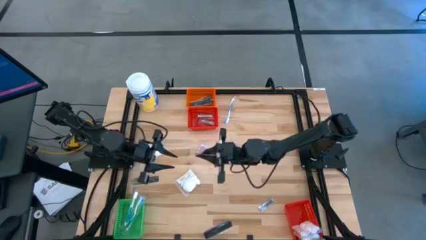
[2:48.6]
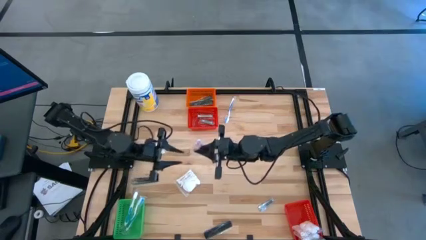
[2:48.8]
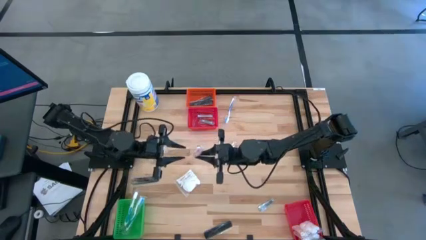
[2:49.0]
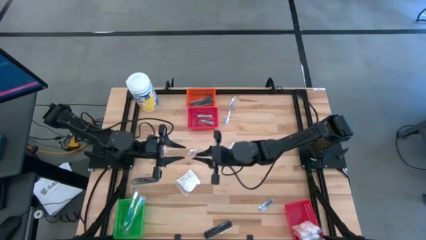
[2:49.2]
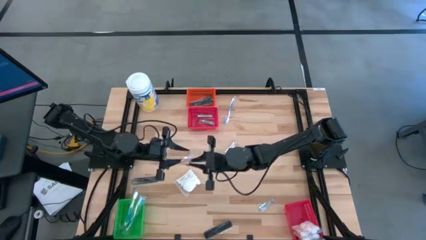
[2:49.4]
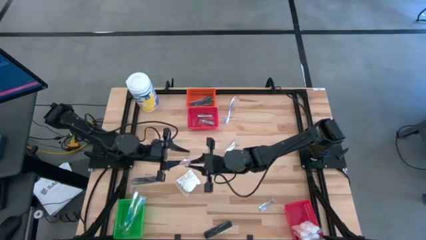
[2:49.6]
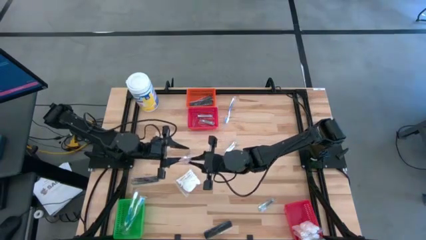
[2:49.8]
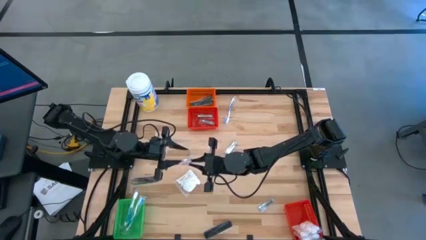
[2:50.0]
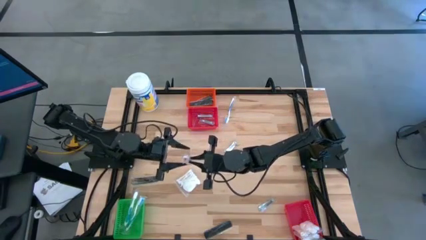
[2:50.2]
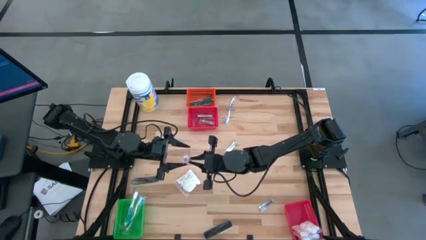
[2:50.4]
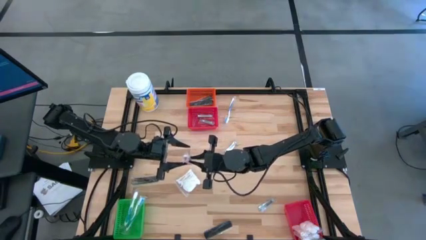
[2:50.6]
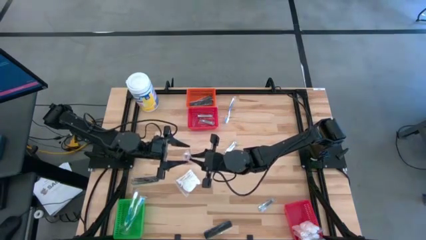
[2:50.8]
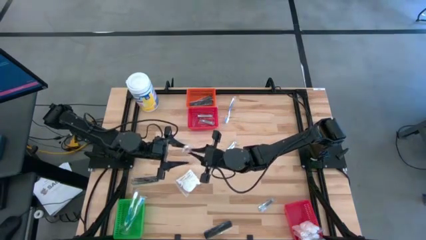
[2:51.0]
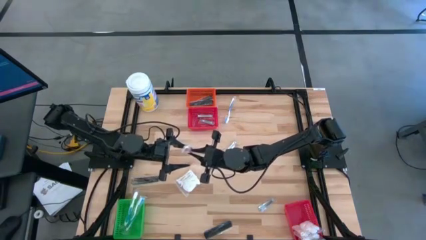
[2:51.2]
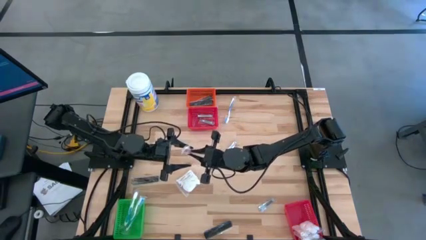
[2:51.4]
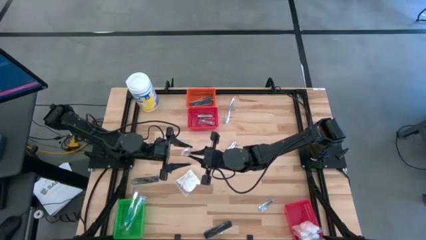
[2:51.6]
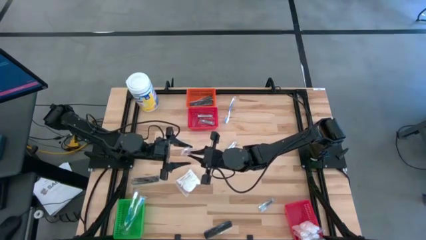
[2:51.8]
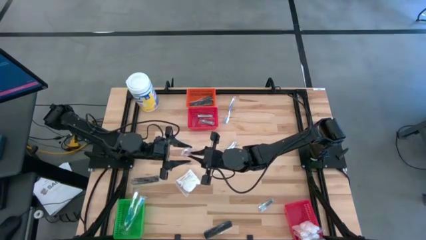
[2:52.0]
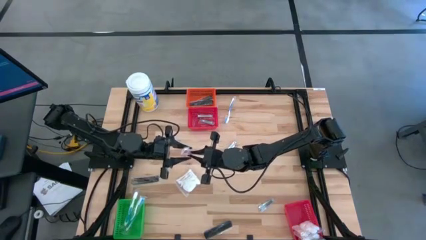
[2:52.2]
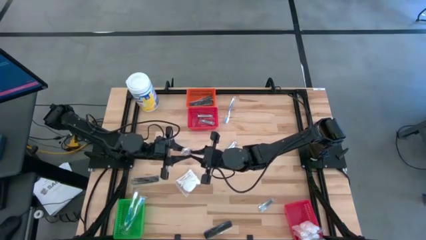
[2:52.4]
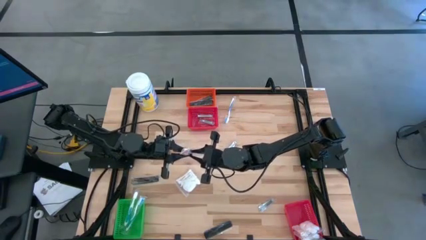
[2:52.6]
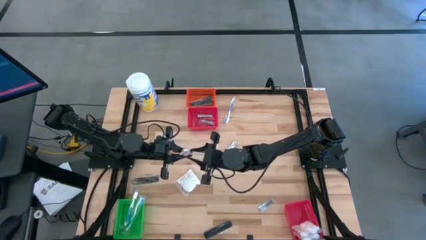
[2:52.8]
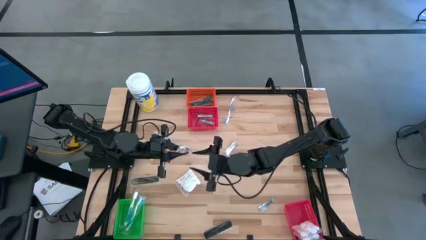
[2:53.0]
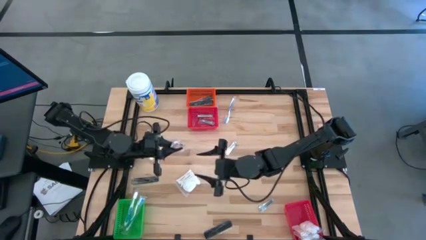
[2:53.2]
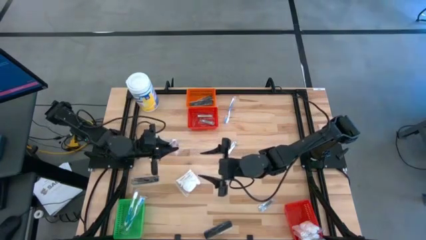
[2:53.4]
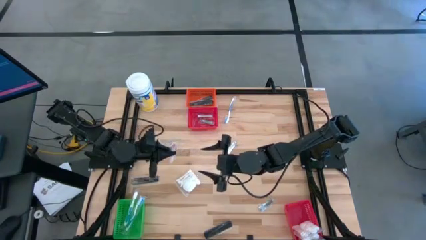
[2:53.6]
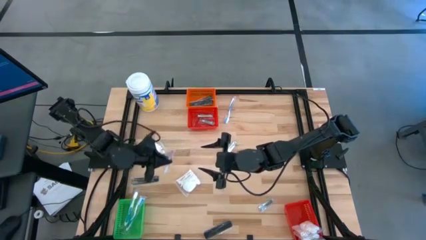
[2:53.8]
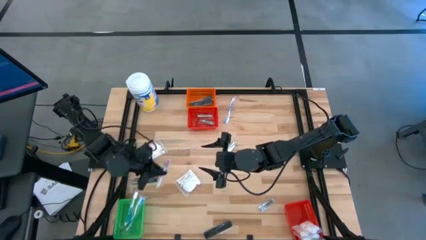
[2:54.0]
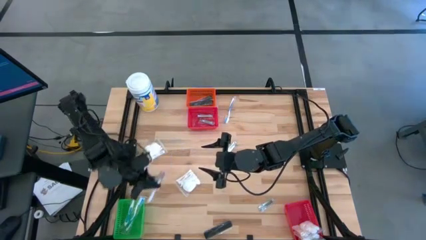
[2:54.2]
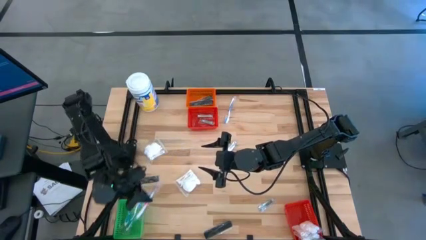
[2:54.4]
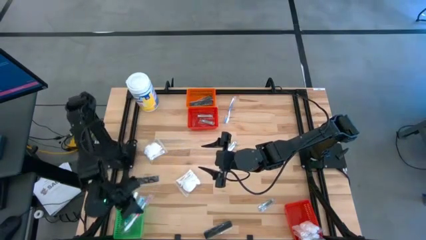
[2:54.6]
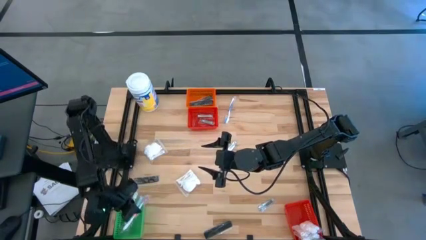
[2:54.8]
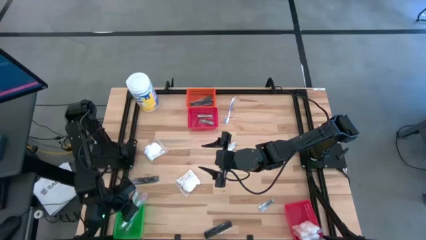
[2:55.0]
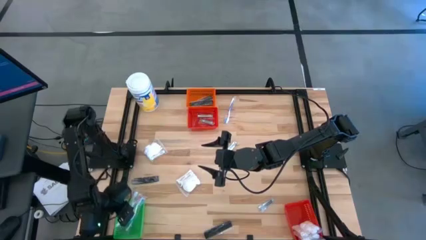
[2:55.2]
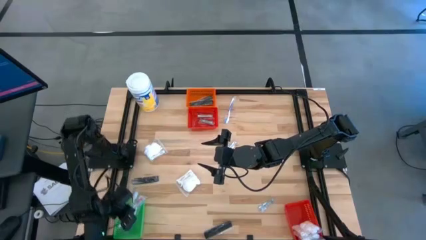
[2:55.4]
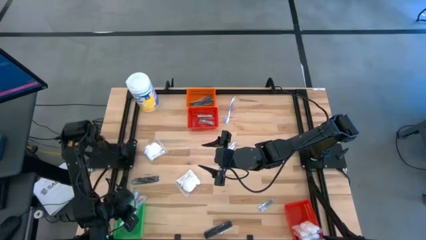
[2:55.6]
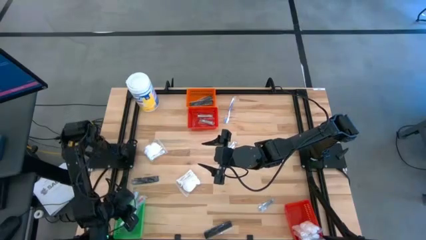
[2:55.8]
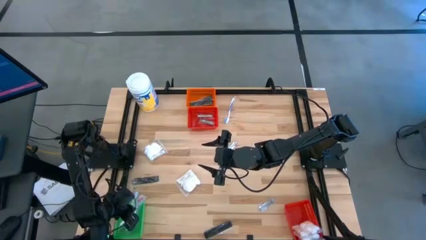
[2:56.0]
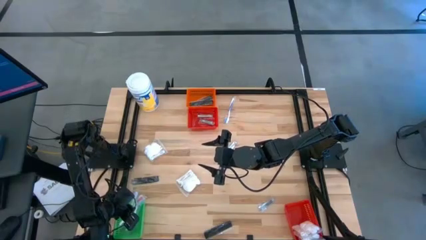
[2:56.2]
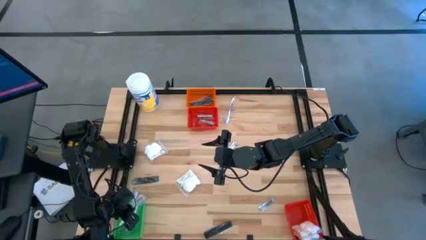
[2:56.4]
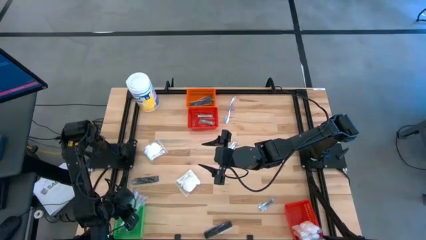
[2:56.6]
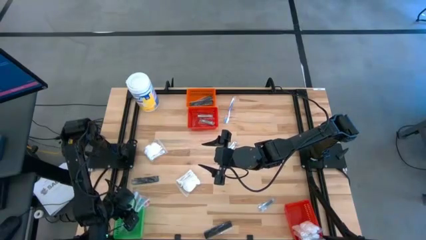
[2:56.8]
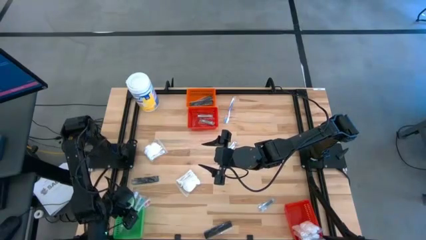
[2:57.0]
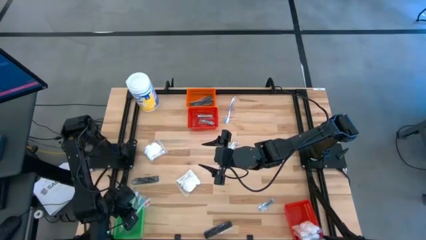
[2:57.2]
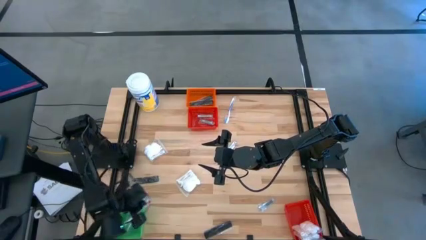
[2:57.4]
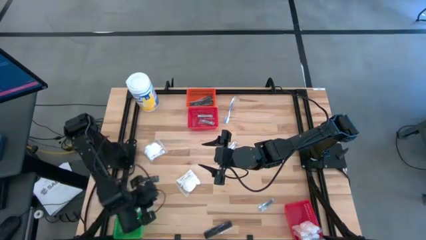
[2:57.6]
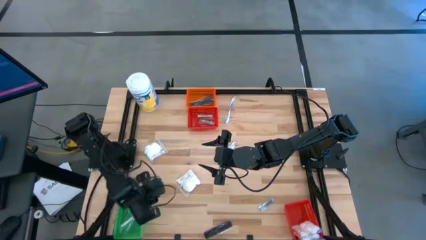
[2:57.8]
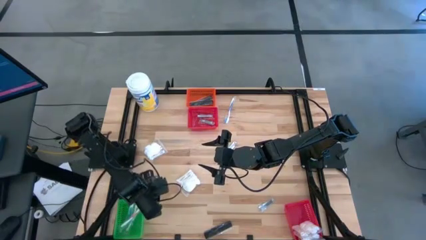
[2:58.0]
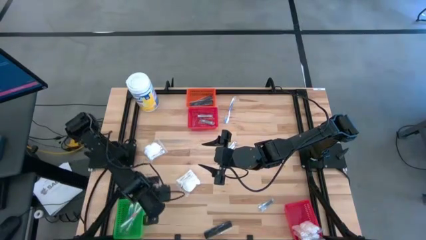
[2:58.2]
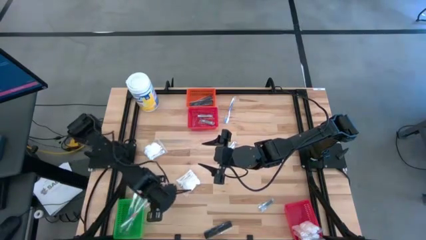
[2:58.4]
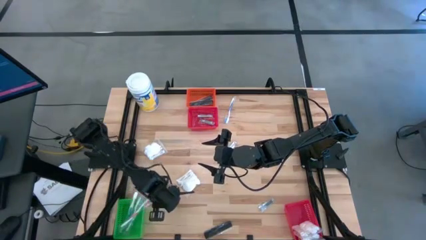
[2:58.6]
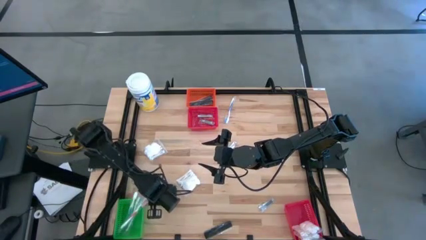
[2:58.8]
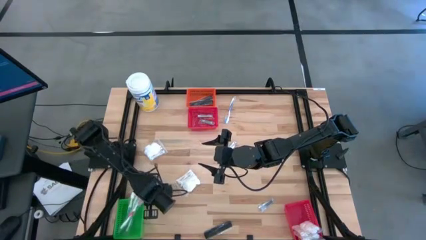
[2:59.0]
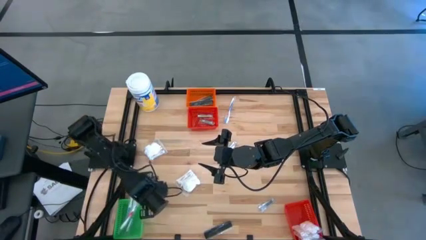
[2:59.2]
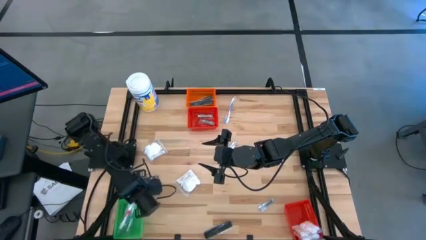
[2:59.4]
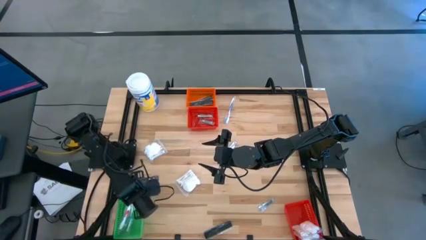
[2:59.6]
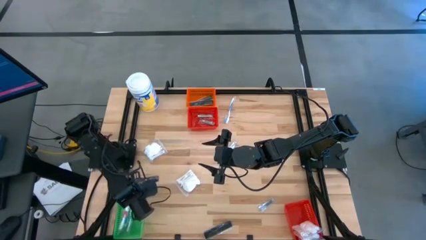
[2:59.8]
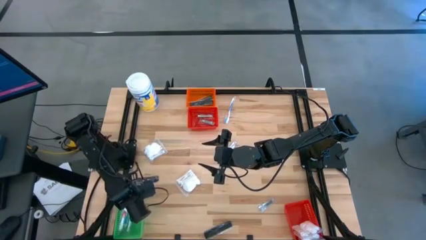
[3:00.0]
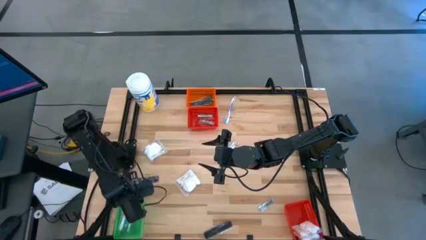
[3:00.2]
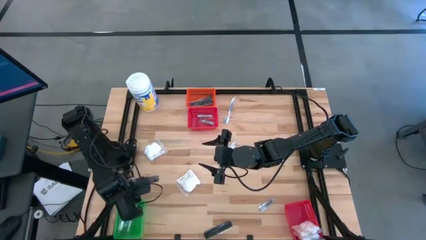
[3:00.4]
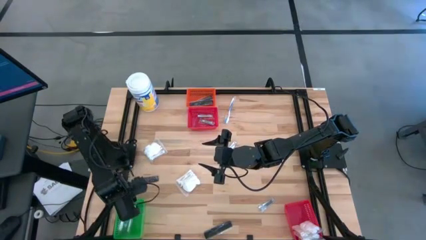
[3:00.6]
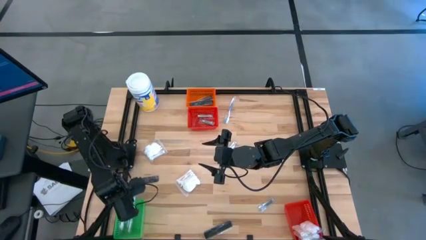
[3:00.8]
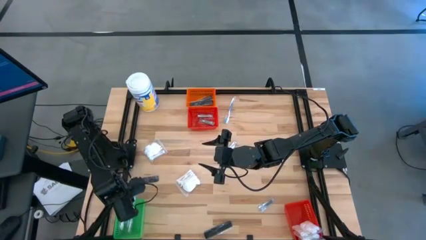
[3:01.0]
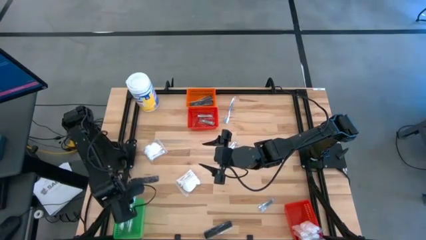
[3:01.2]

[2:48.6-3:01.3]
Task: Pick & Place Travel size toiletries
Put the red toothbrush into the green basket

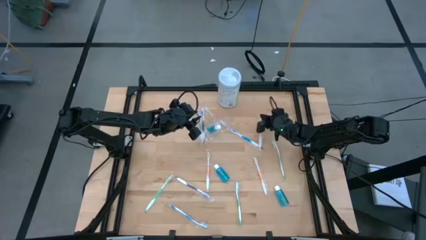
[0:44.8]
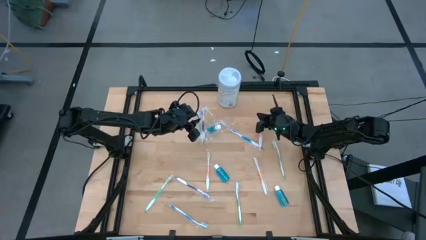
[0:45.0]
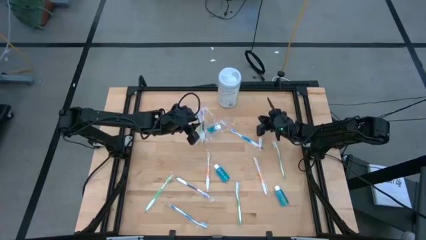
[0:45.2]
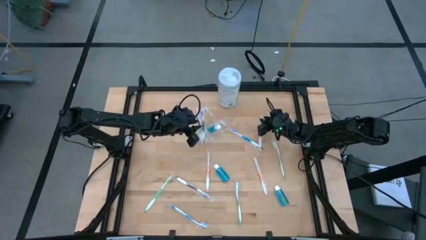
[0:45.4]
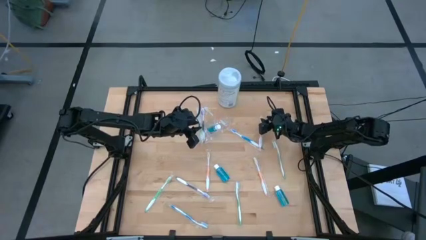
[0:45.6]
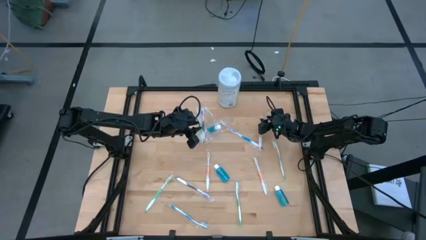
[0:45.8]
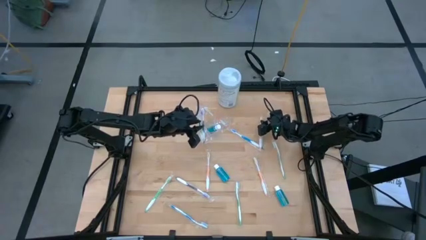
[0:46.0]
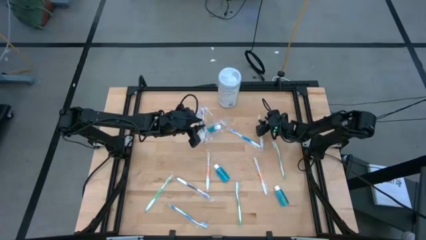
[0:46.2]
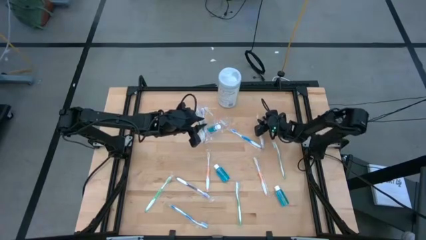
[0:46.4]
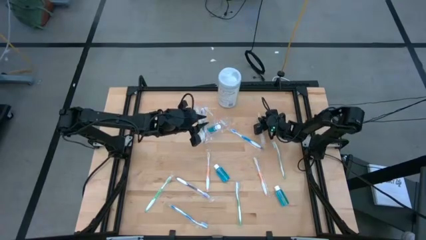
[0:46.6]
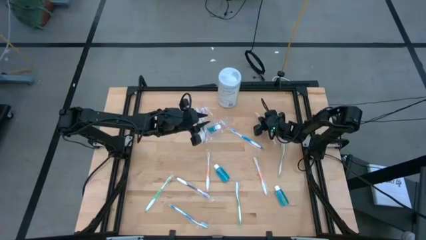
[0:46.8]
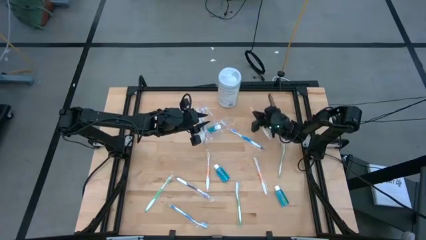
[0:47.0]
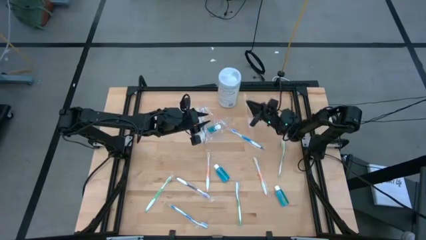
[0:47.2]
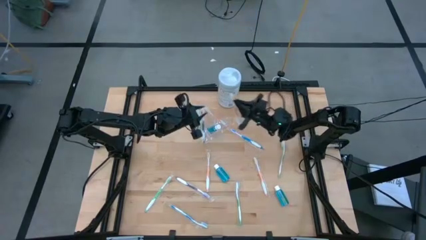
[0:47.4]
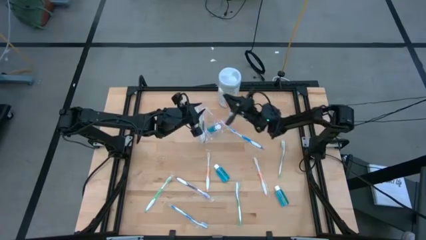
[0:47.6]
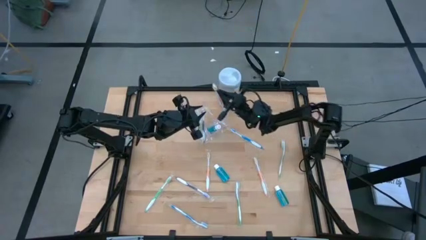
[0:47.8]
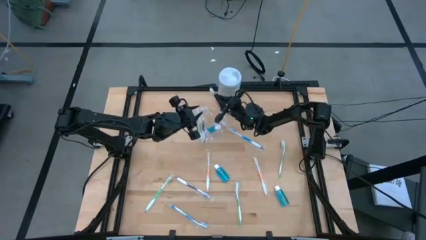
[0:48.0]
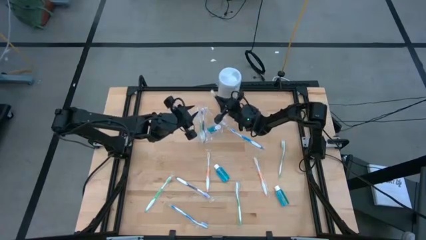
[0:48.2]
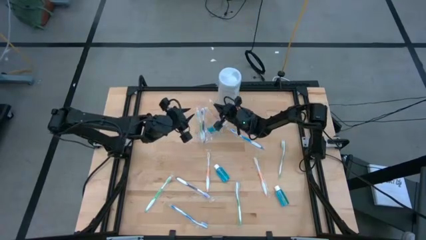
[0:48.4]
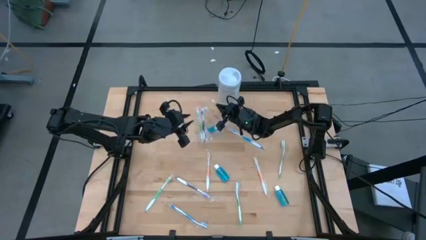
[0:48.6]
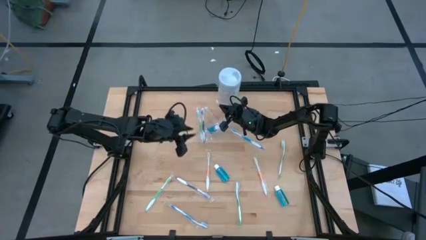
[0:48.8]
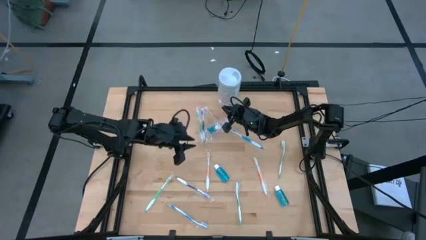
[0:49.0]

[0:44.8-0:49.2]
Task: Pick & Place toothbrushing station
Put the orange toothbrush into the transparent organizer
